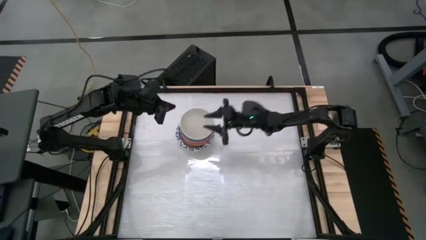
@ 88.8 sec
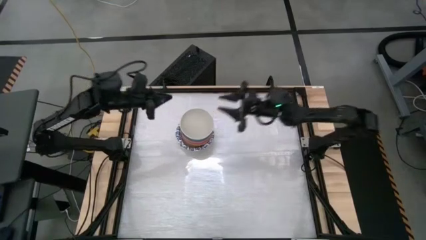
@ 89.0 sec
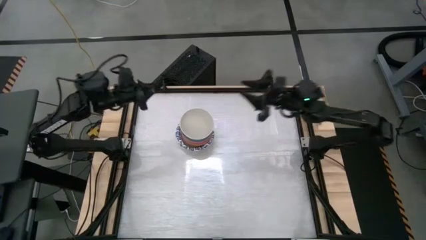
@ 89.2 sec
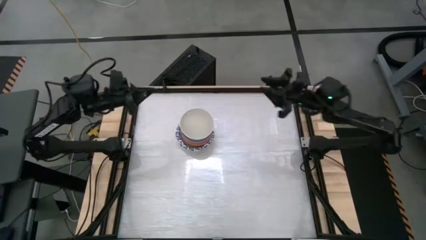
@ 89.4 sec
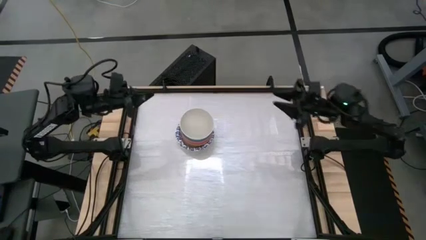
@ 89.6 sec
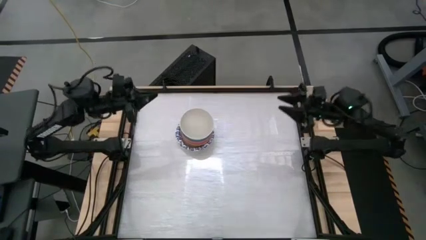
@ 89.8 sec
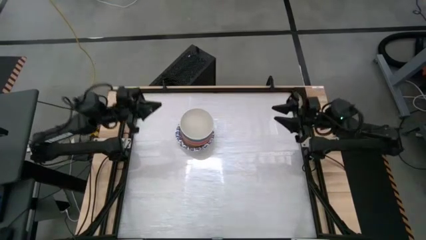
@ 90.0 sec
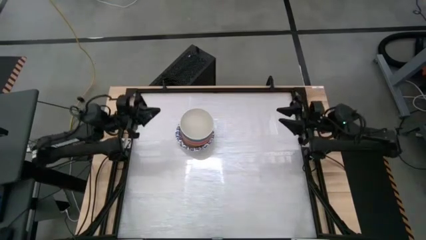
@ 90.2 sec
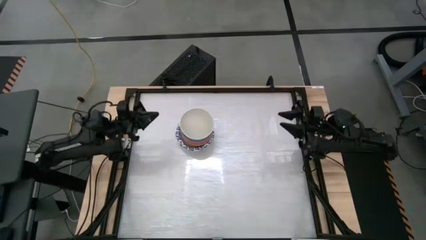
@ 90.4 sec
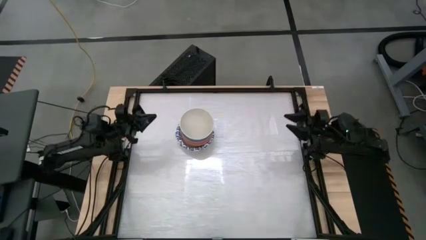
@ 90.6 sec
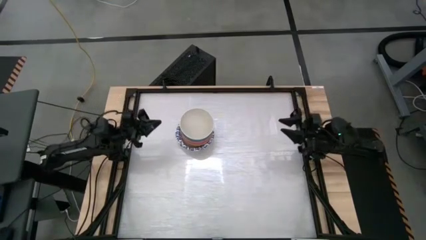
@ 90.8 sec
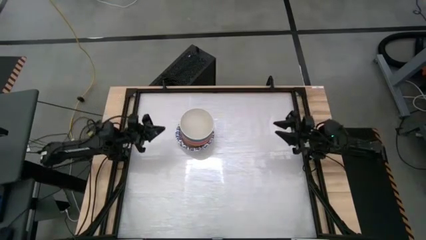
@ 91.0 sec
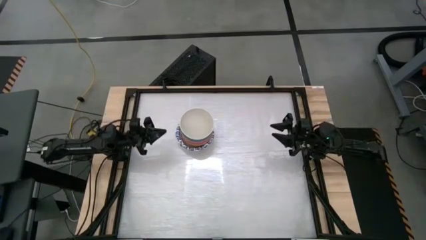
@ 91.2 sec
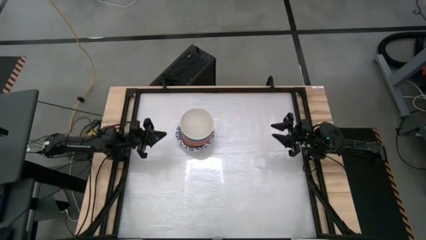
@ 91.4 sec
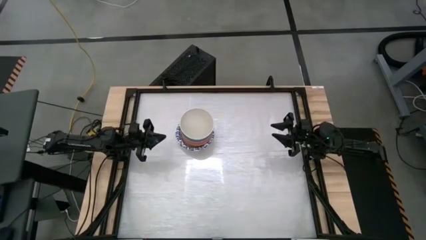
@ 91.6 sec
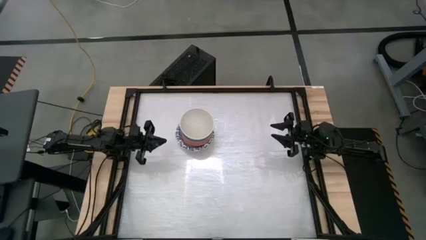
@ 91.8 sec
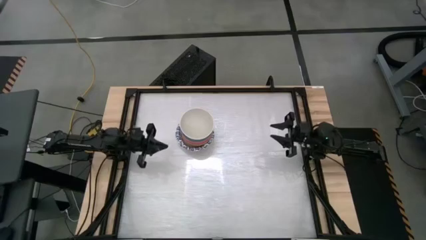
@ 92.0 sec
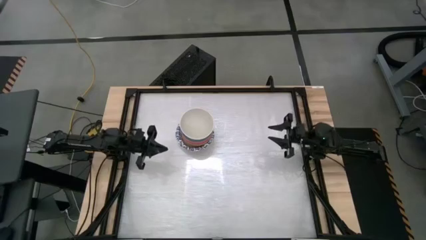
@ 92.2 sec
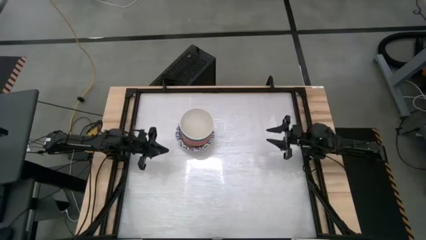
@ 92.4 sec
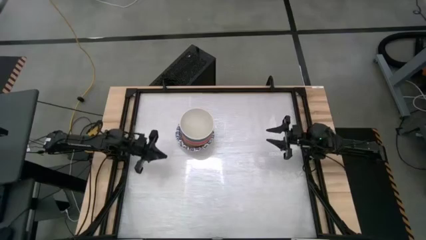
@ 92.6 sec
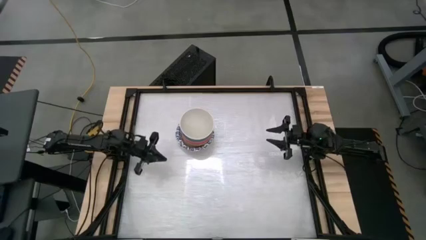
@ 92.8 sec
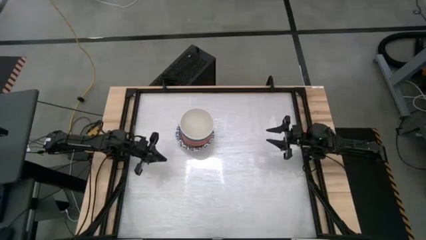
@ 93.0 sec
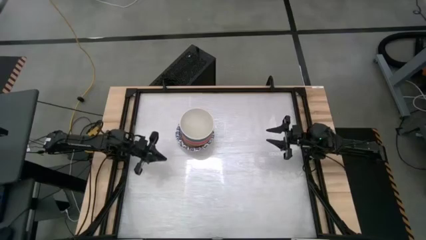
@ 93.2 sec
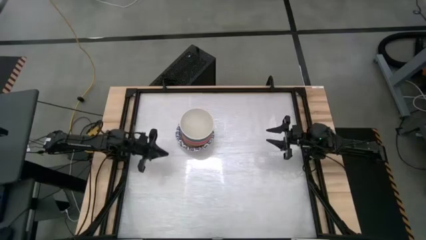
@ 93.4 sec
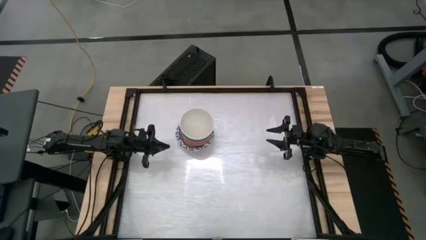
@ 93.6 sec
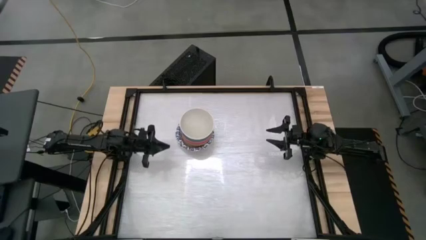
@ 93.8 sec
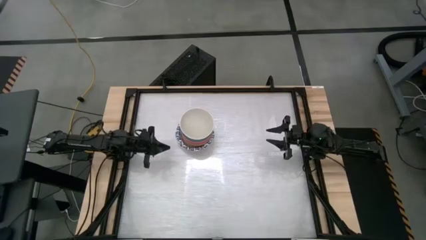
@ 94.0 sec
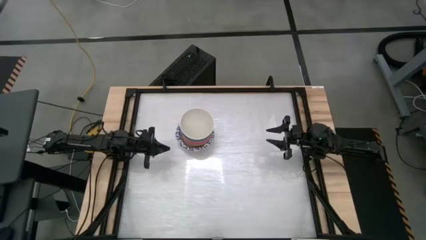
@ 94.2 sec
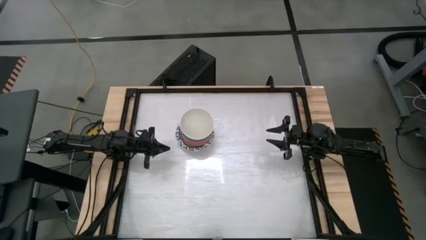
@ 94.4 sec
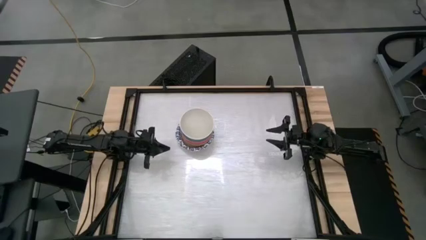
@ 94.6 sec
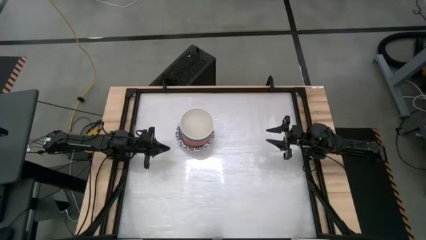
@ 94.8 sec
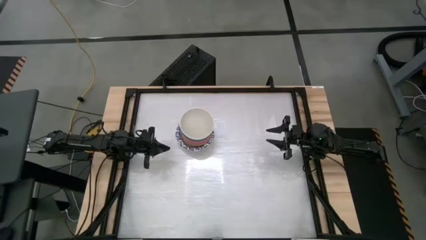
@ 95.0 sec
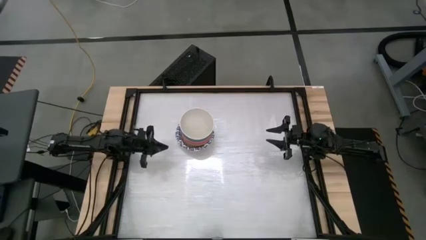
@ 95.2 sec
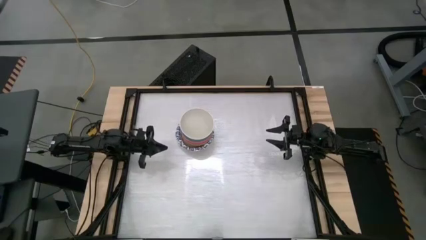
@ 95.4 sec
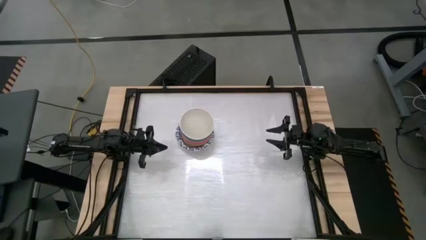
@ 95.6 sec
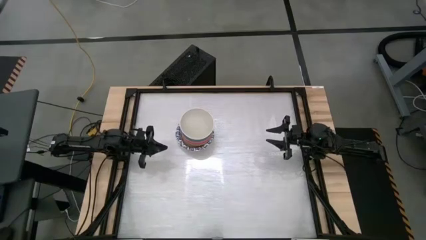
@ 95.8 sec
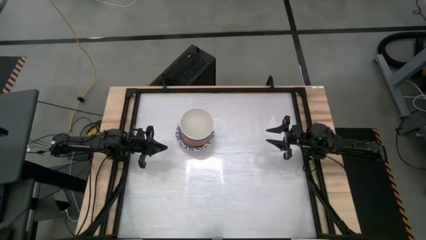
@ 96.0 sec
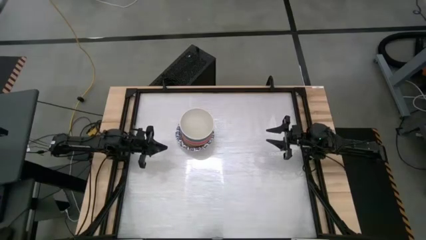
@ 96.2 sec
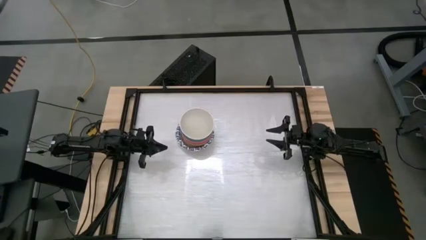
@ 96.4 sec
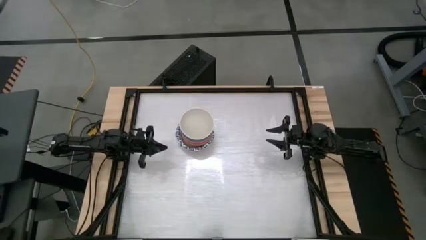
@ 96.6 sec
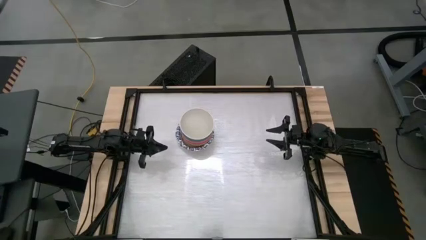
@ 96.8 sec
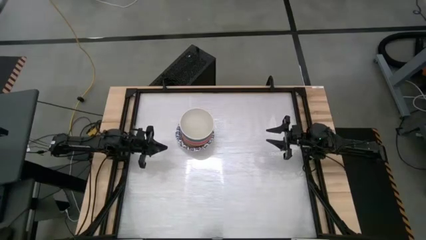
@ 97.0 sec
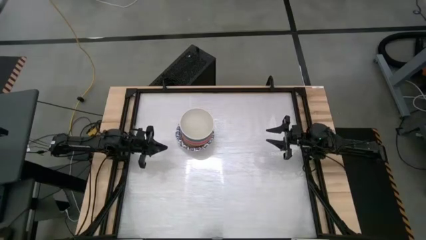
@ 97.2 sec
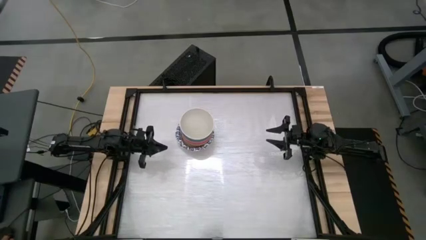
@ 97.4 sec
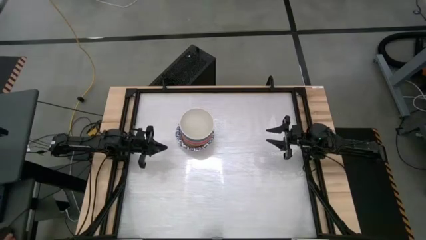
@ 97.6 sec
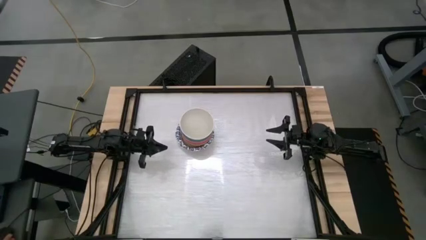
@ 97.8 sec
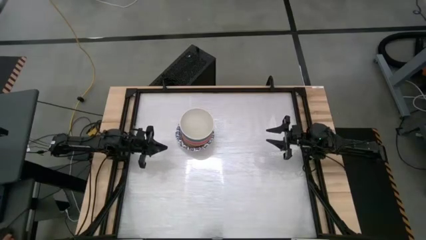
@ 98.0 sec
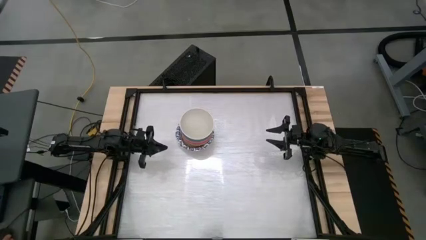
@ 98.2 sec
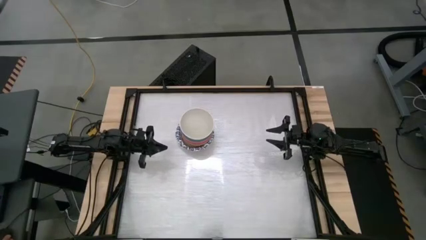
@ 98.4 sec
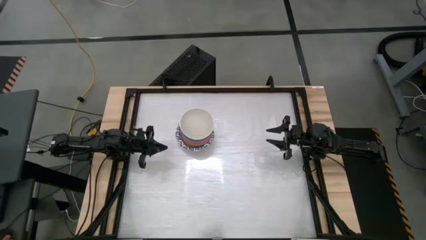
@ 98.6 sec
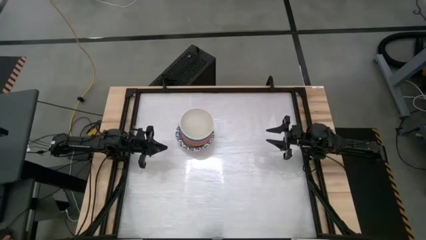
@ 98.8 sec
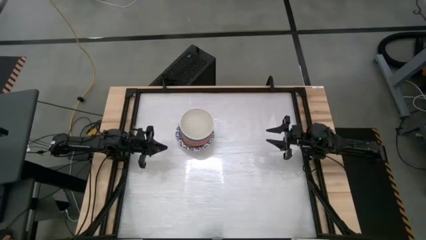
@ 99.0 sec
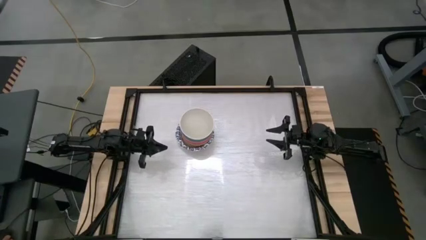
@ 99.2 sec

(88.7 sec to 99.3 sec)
Return to Home Position
